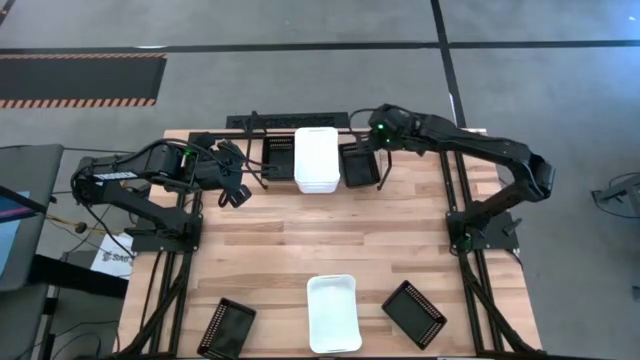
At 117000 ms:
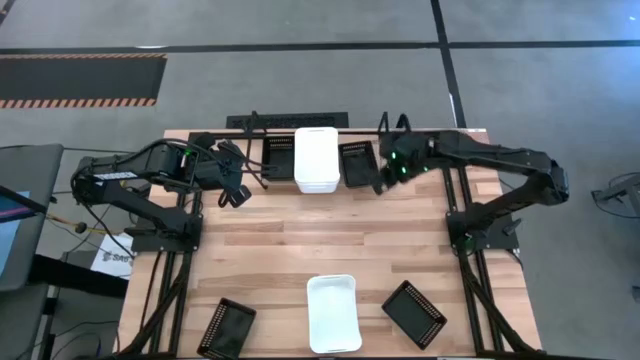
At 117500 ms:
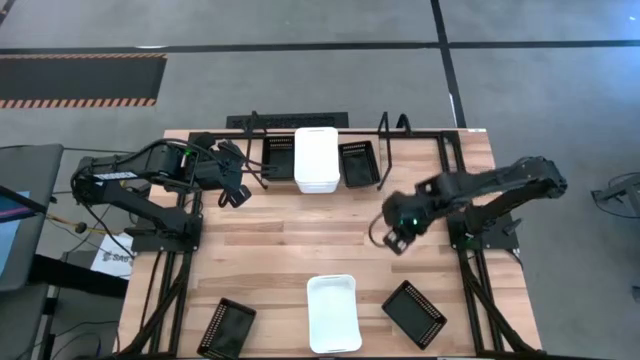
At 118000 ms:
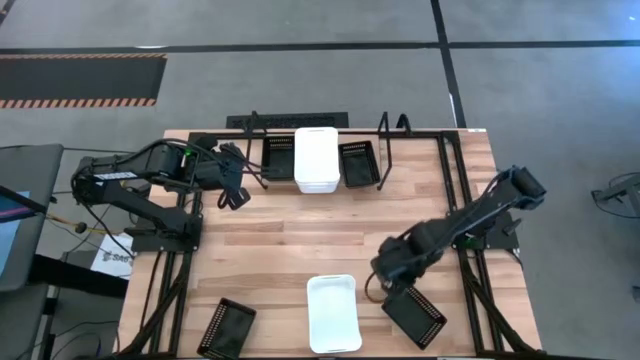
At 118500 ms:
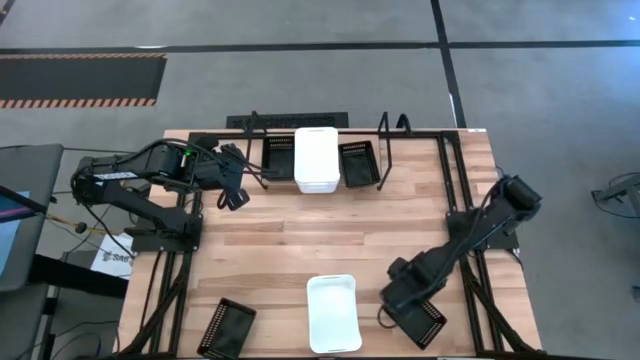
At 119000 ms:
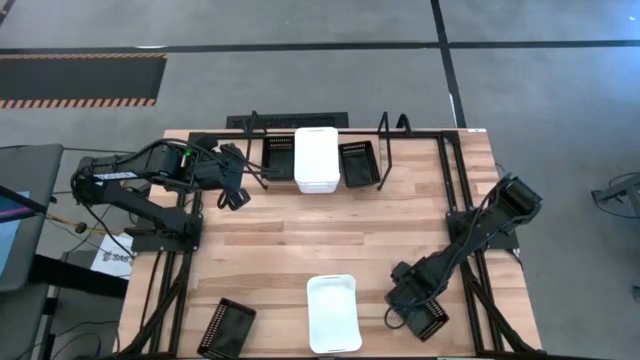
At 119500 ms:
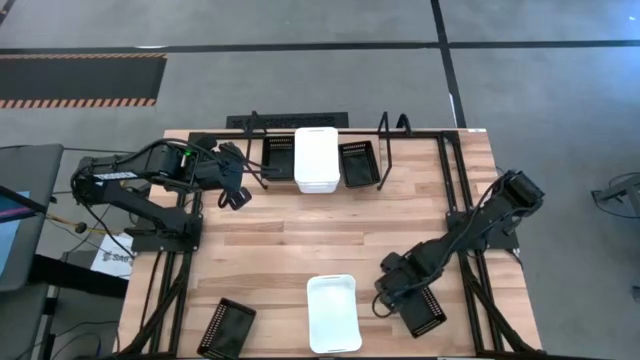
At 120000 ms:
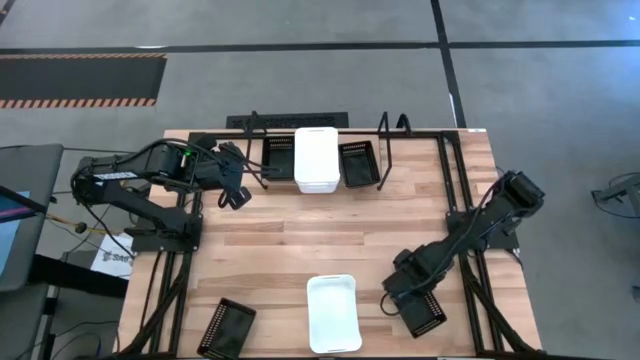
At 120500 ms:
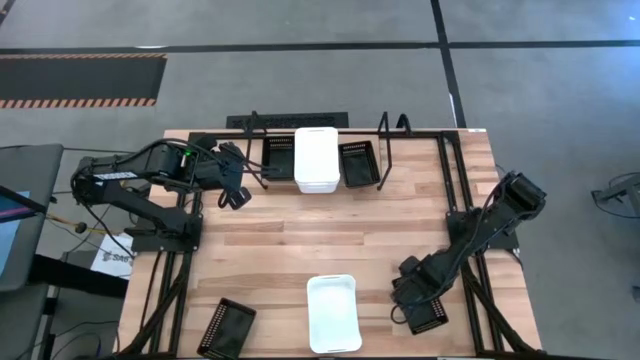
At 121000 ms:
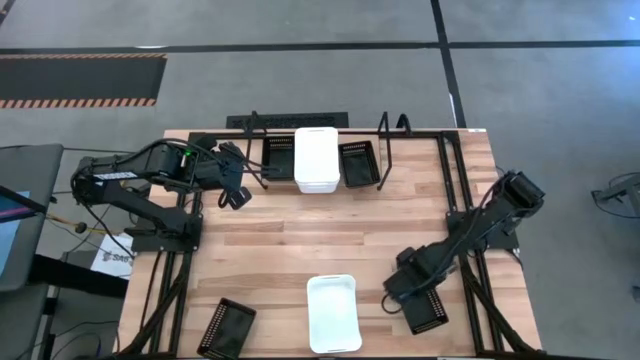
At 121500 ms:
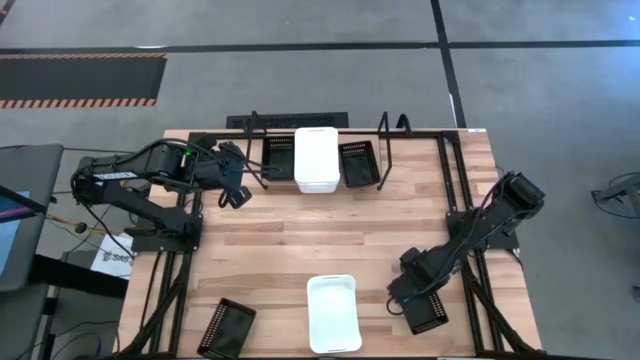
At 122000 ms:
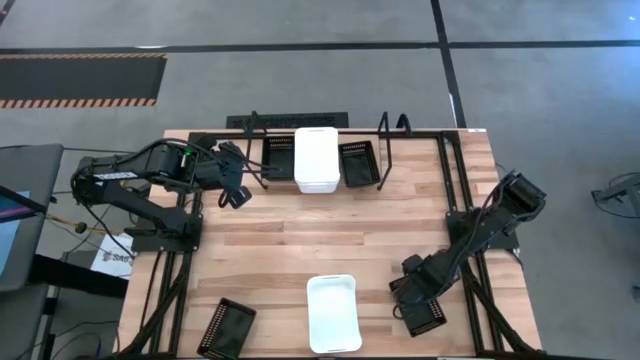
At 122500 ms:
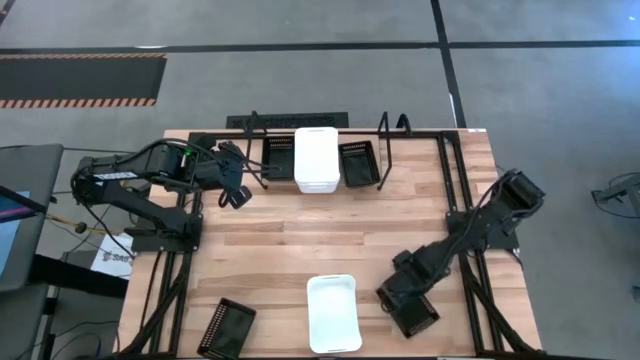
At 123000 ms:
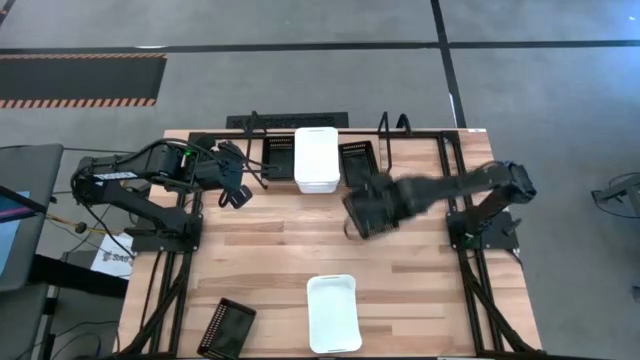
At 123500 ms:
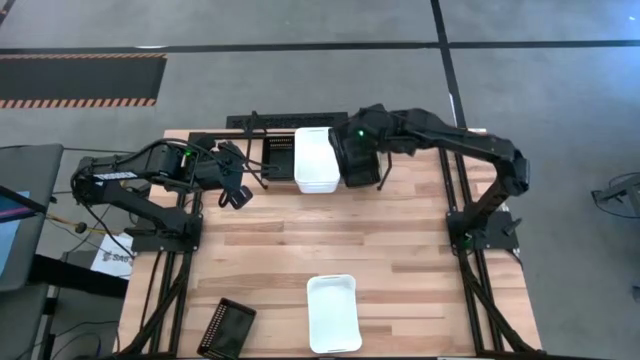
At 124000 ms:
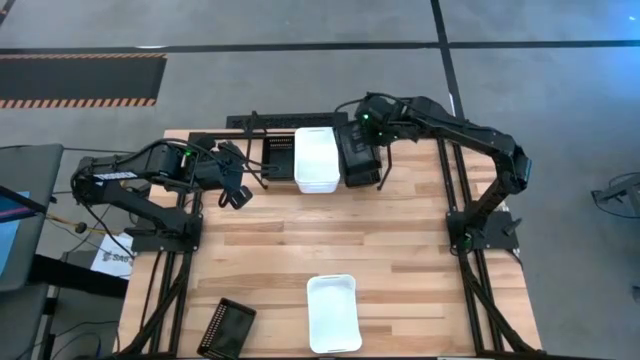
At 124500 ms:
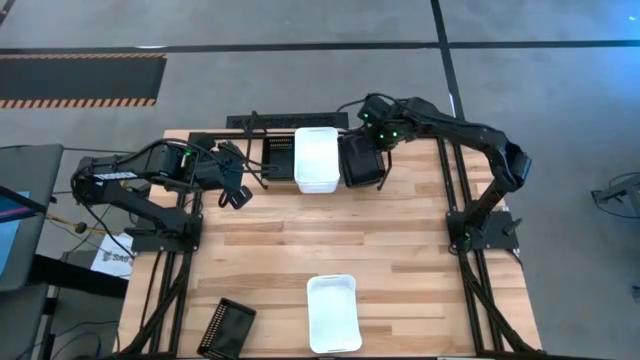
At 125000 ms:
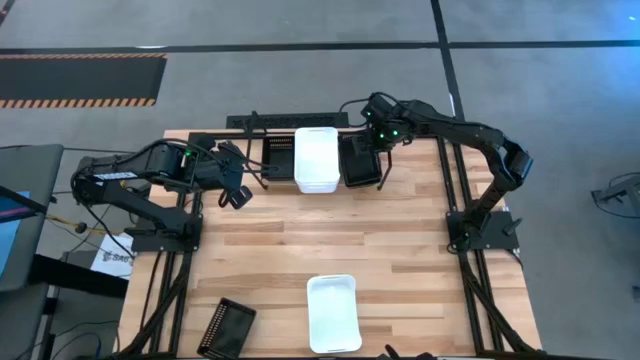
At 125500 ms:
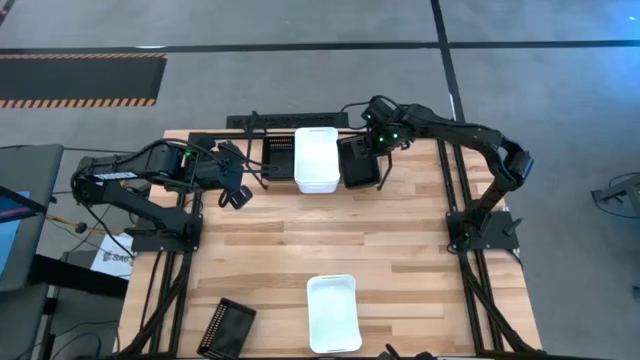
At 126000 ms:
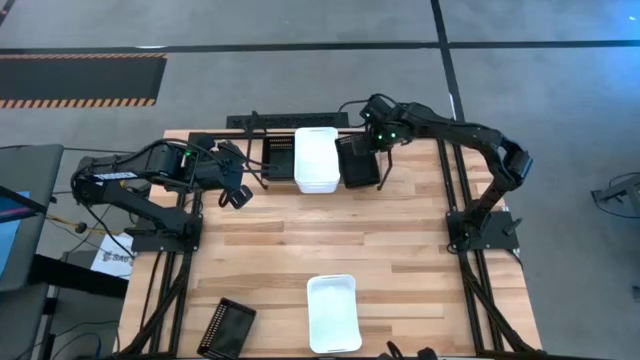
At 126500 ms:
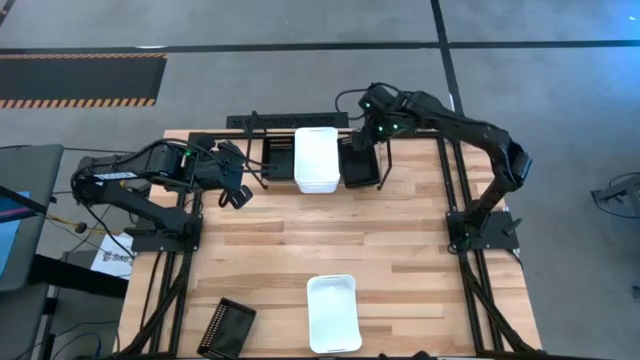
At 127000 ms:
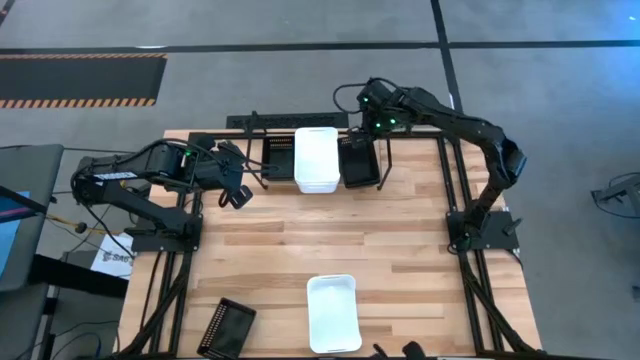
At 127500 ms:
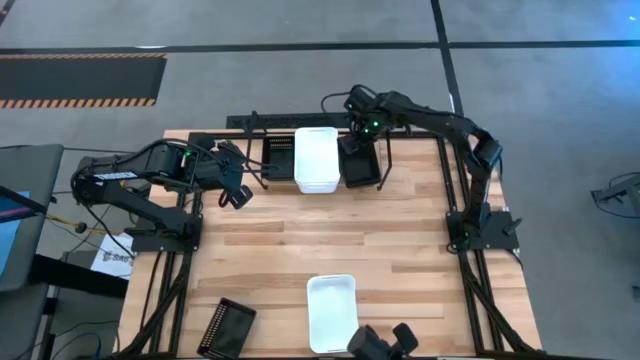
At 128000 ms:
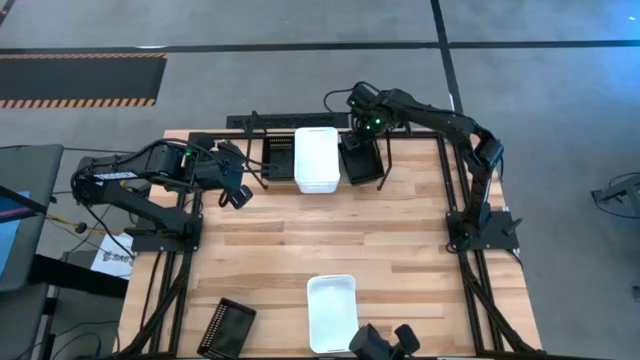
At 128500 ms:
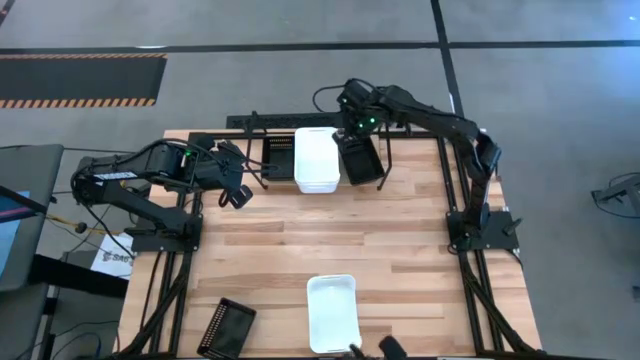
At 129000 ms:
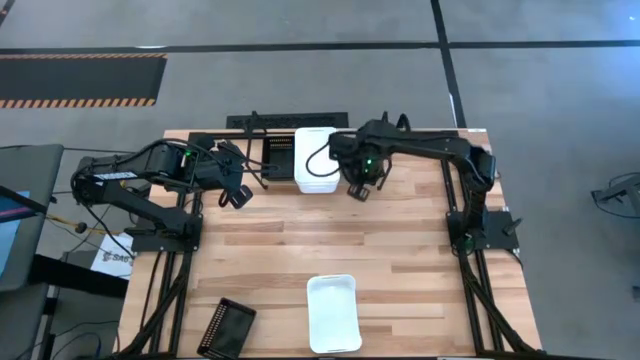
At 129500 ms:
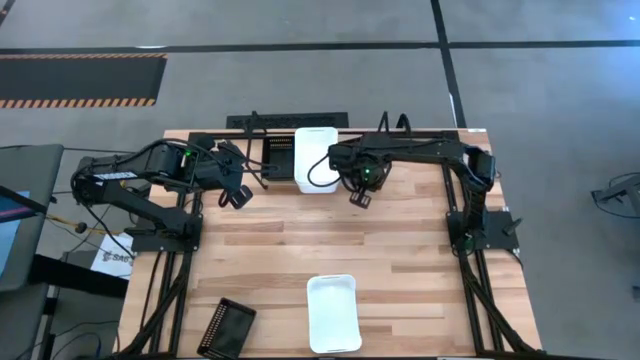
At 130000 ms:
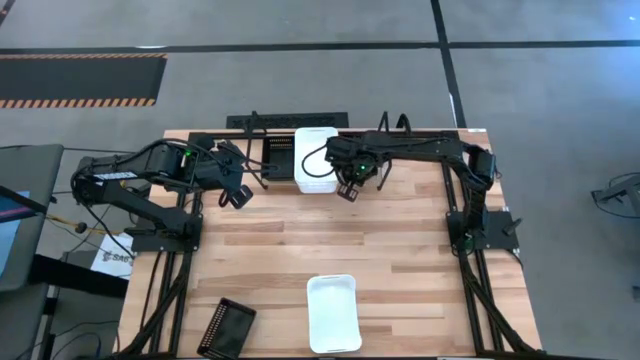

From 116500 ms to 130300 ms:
Task: Stack baskets on shelf by color
Stack the black bin on top of the right black bin on the shelf

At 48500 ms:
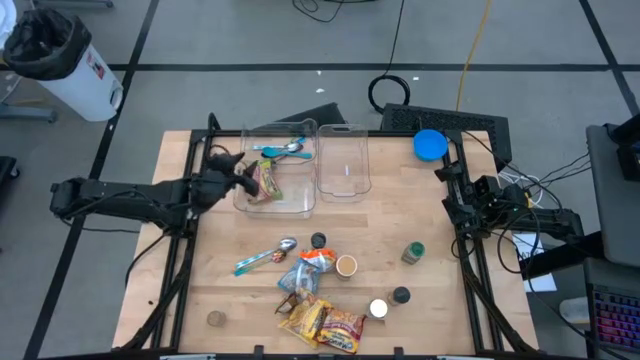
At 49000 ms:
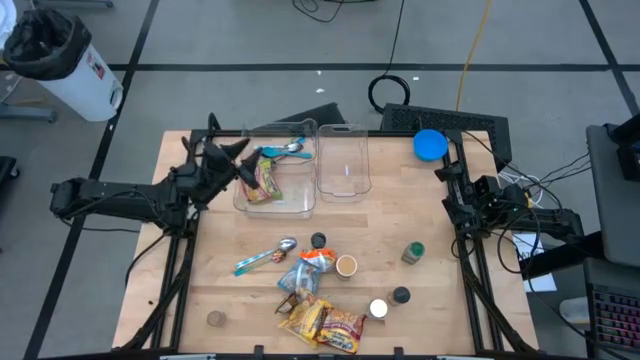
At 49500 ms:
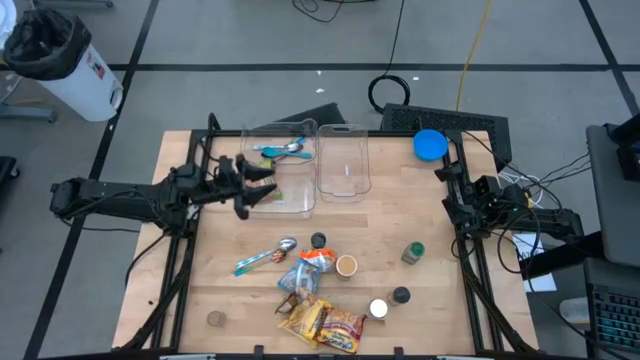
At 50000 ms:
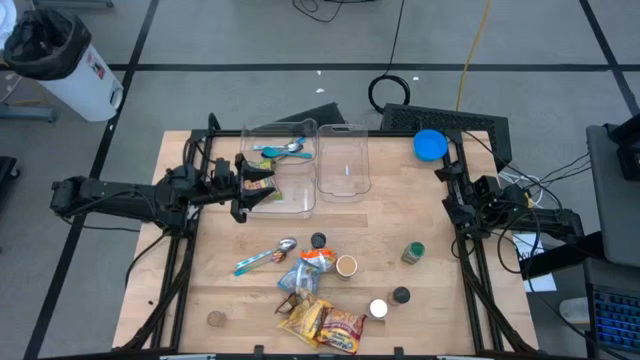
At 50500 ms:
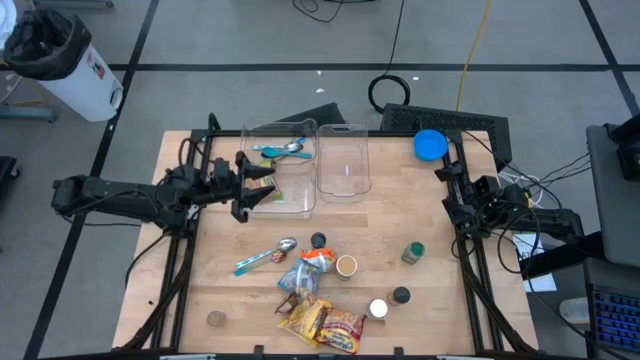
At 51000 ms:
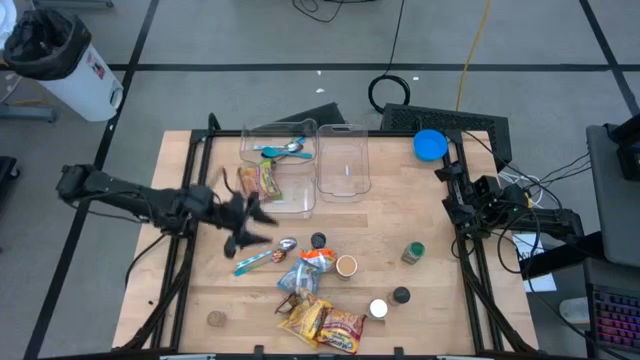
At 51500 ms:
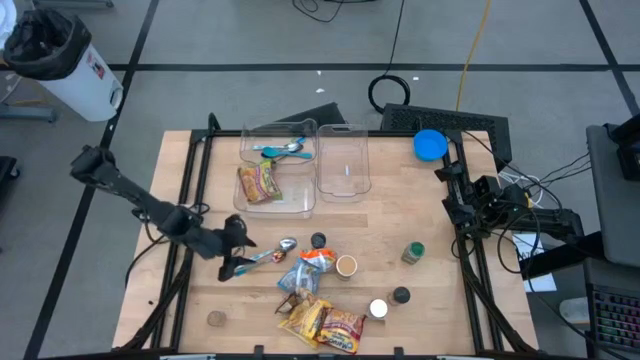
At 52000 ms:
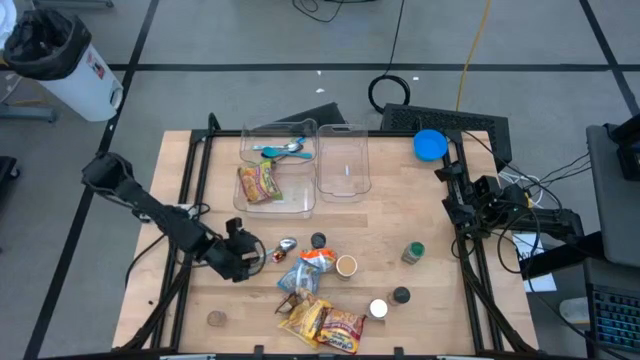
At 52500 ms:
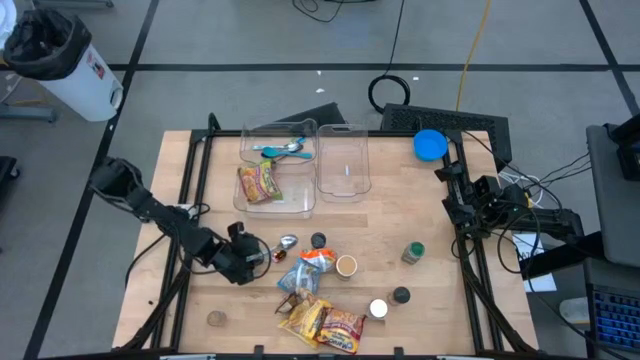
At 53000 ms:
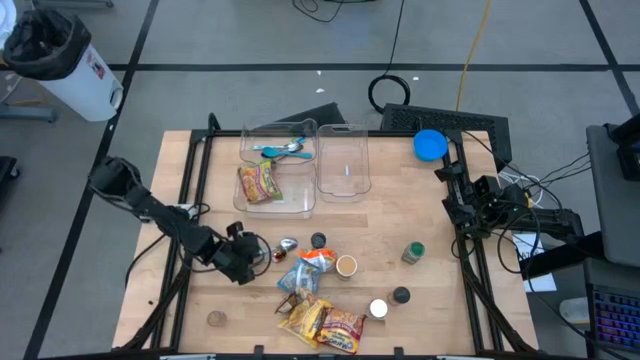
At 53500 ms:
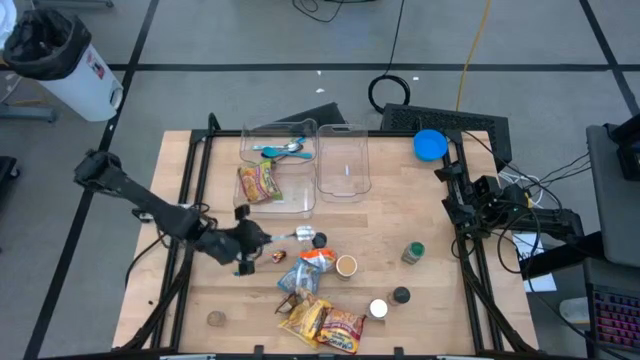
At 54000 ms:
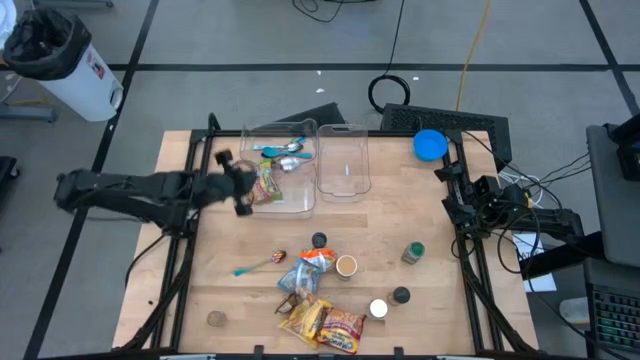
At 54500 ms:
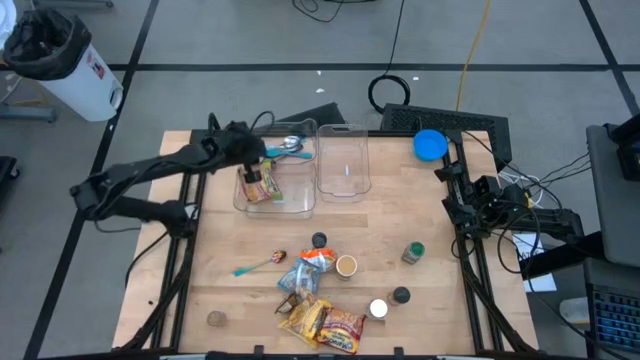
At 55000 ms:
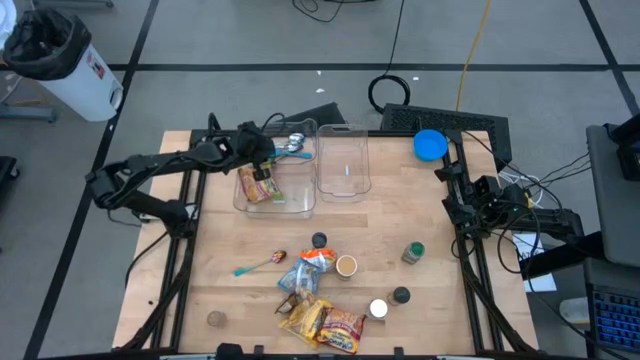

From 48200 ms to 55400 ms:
Task: Pick & Place Food Item
Put the green patterned spoon into the top left transparent bin
